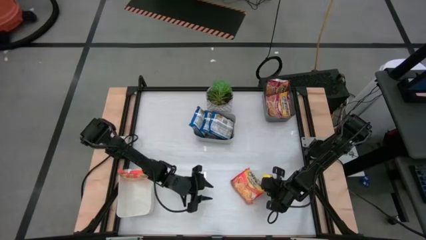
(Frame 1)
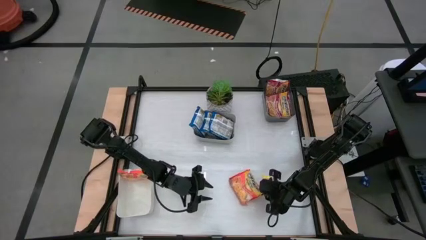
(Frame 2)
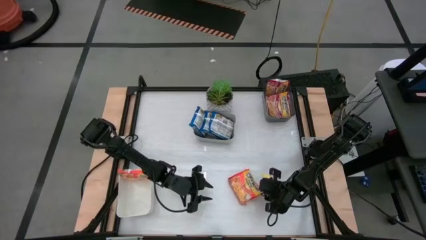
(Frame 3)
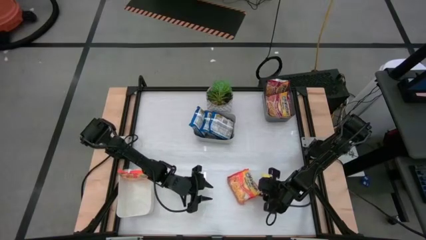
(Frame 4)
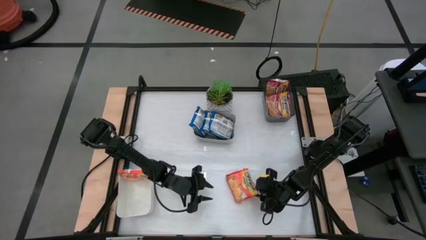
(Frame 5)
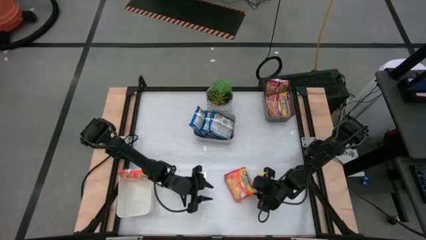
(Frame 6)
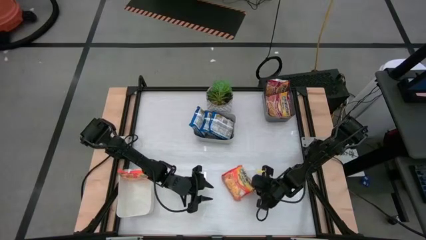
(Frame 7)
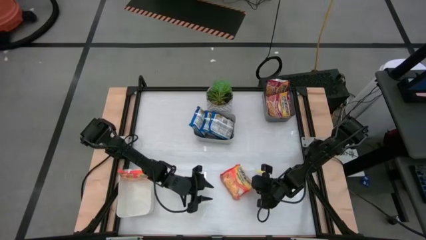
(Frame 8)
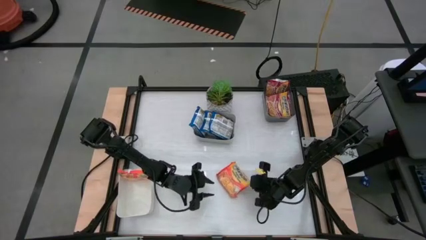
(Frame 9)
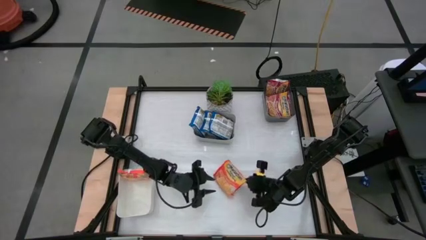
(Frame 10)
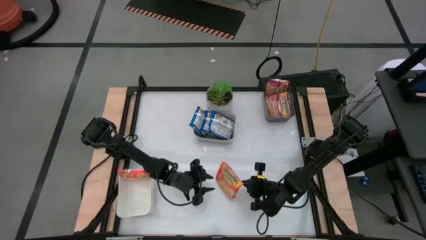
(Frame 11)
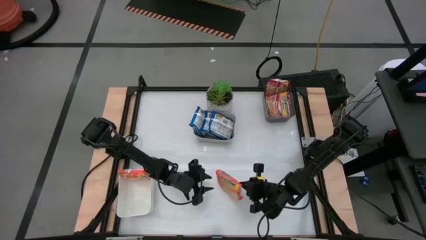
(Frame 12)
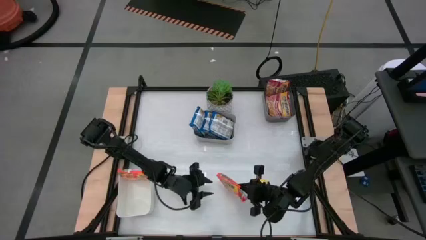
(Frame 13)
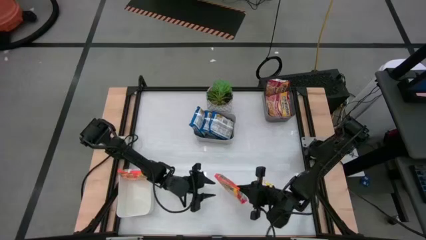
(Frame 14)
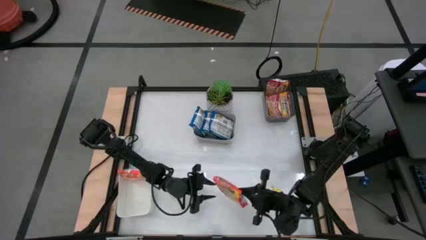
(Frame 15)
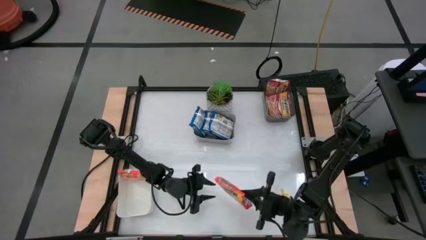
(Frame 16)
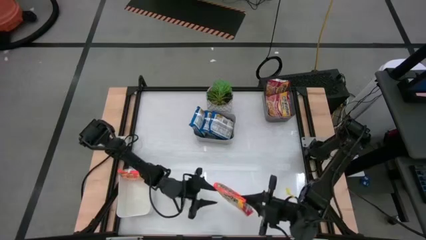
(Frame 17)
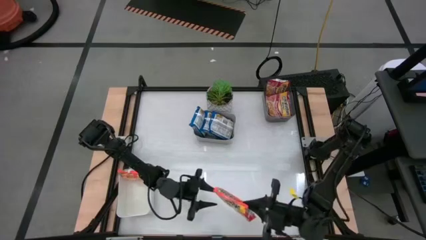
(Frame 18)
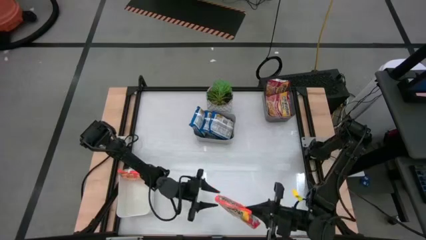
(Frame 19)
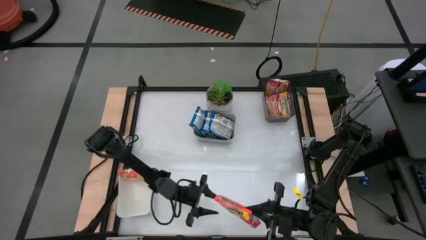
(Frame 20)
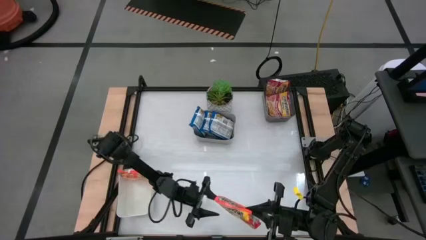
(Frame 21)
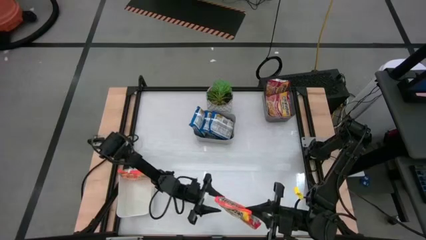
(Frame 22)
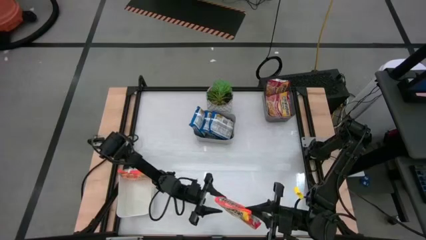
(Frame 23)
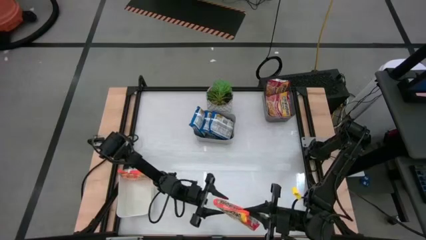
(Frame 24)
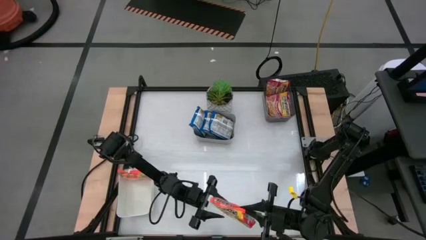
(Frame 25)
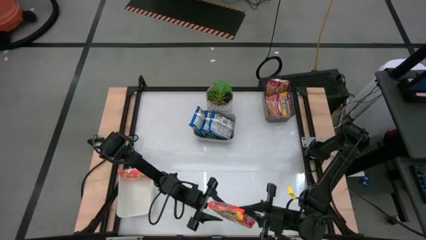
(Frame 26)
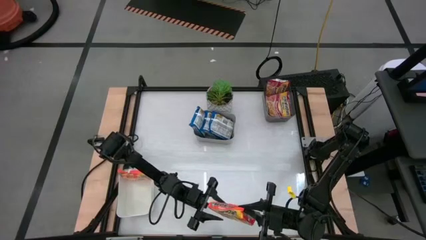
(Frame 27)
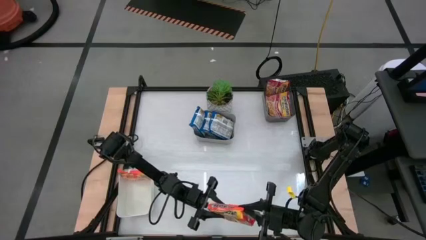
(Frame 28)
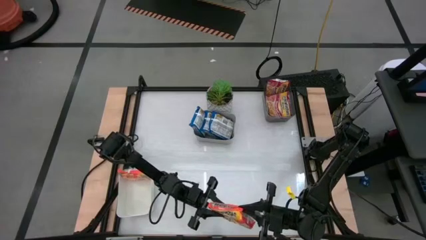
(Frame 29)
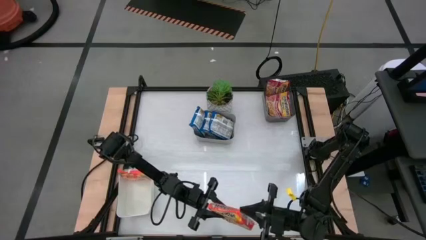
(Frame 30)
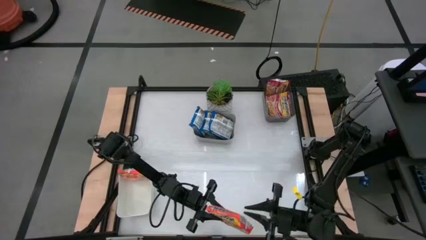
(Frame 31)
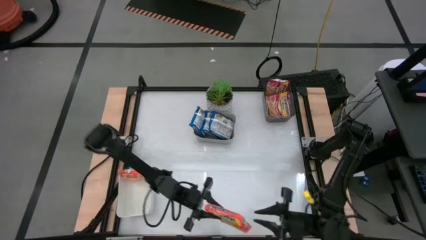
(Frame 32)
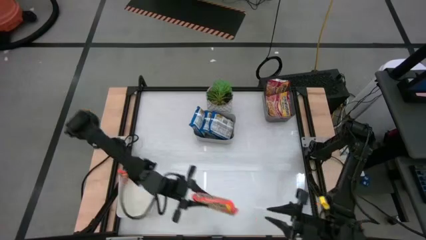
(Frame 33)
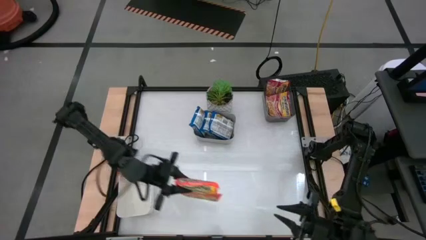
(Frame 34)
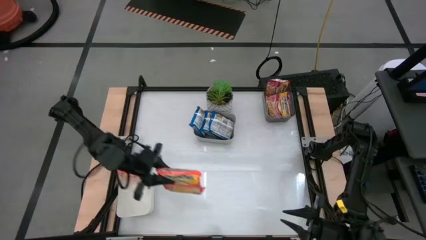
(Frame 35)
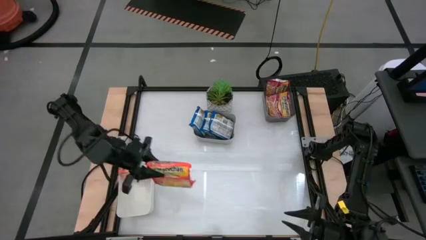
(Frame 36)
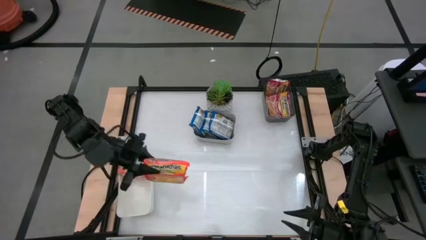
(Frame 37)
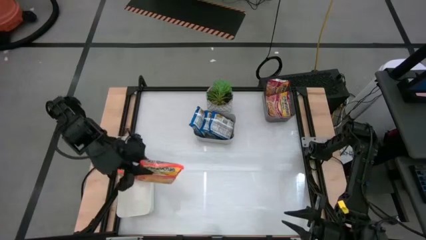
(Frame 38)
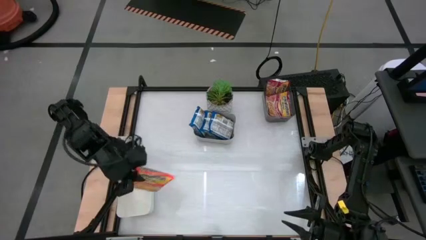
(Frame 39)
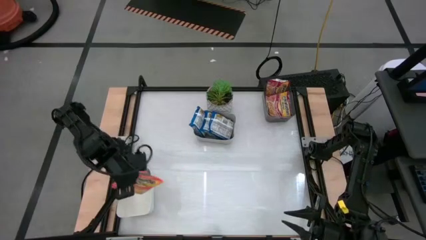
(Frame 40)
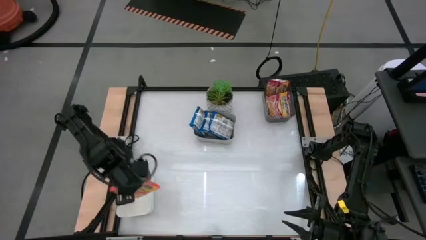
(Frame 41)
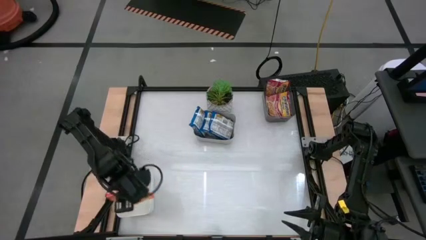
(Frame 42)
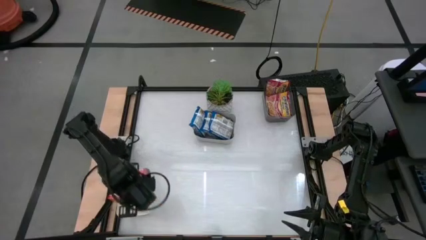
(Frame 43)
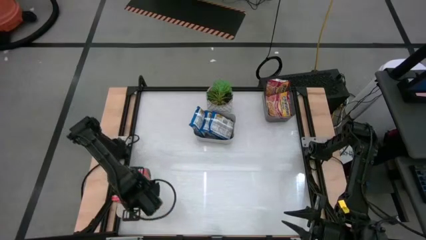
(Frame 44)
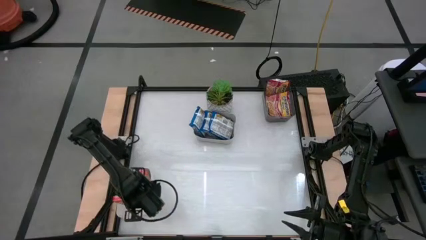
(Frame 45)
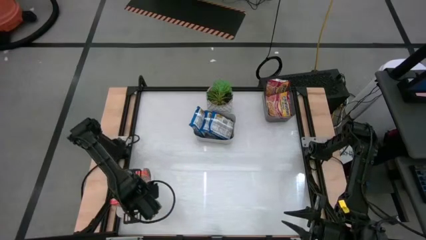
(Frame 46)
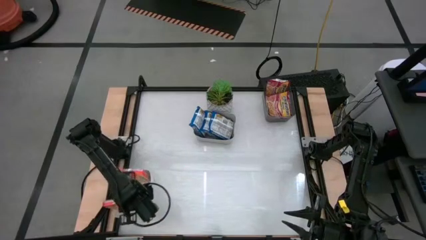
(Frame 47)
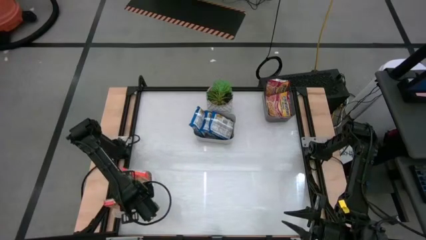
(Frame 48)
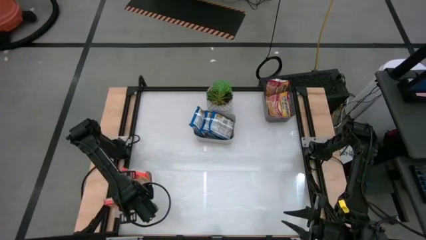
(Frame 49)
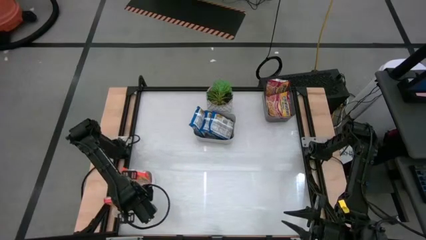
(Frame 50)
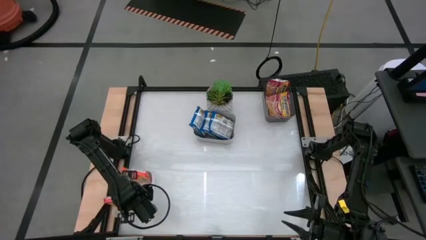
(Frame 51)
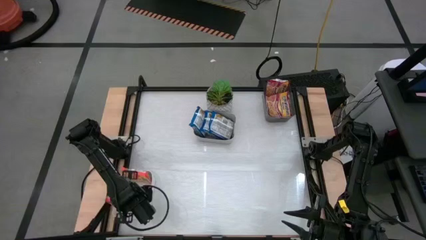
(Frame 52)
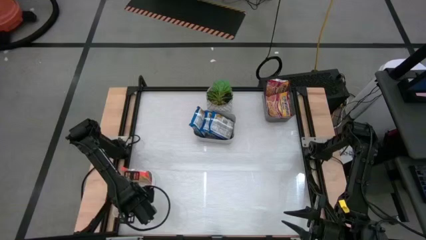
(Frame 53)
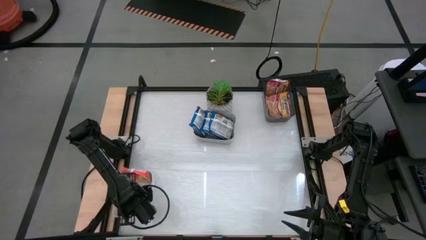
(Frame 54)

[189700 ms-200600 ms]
Task: Sort Maruchan noodles
Put the orange noodle pack into the white bin

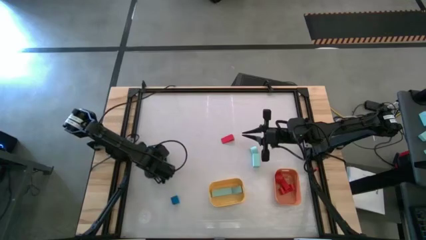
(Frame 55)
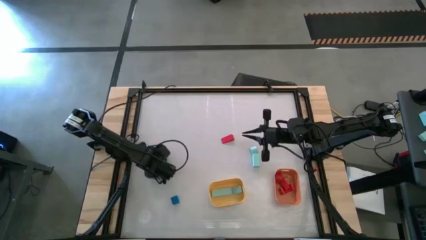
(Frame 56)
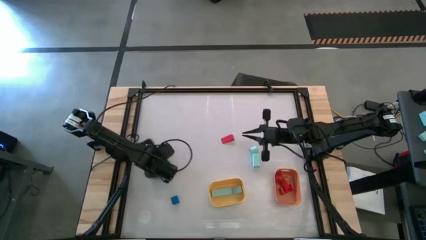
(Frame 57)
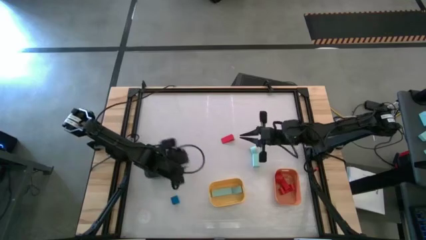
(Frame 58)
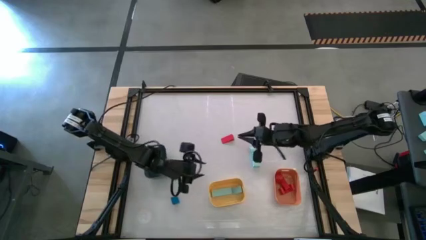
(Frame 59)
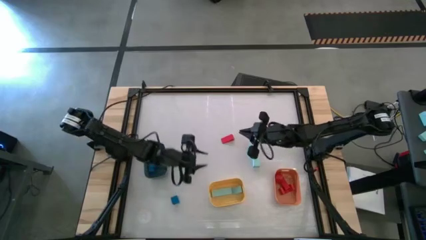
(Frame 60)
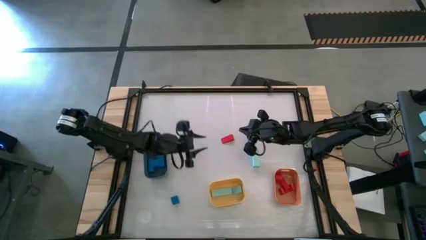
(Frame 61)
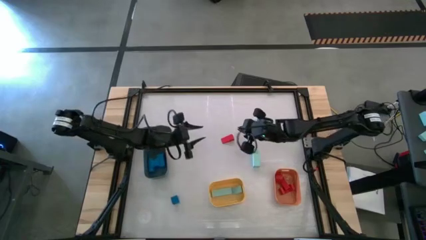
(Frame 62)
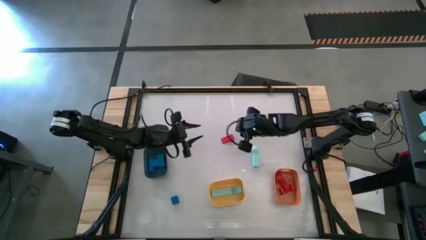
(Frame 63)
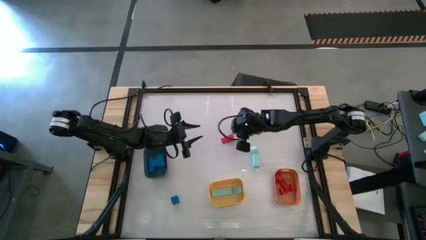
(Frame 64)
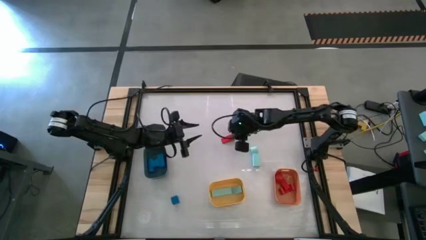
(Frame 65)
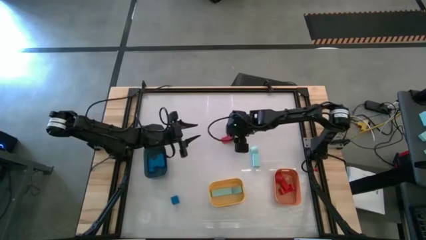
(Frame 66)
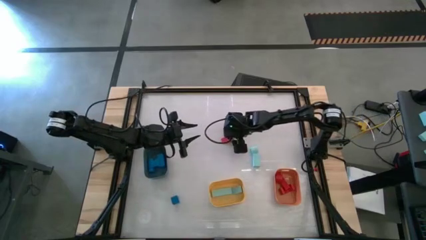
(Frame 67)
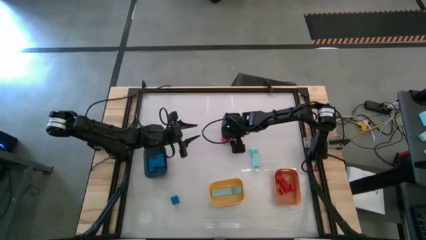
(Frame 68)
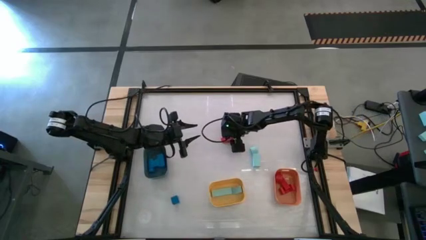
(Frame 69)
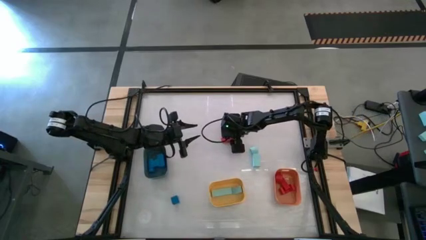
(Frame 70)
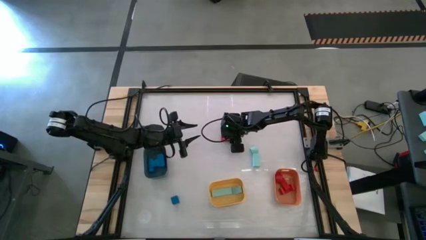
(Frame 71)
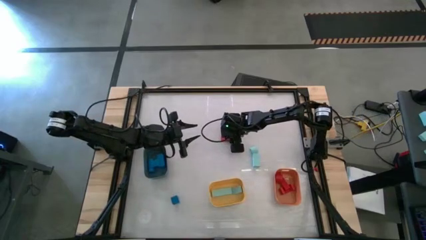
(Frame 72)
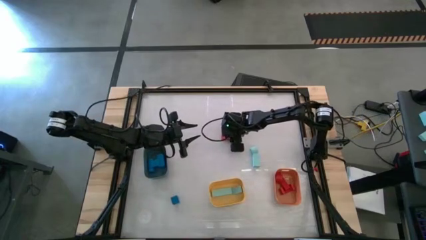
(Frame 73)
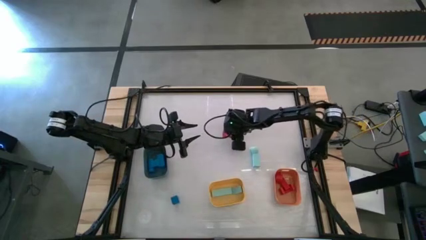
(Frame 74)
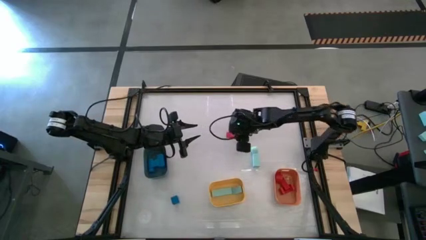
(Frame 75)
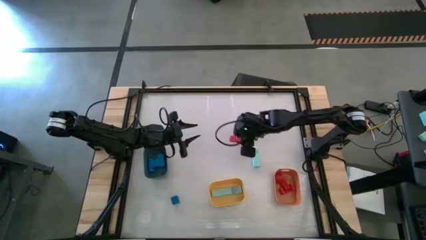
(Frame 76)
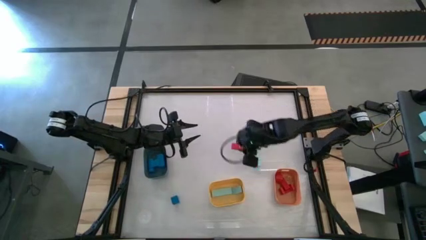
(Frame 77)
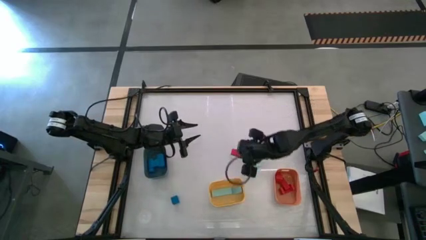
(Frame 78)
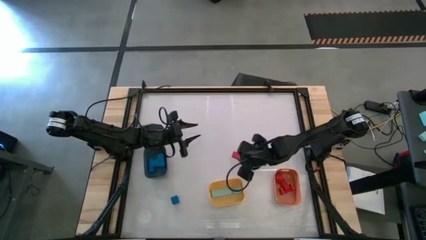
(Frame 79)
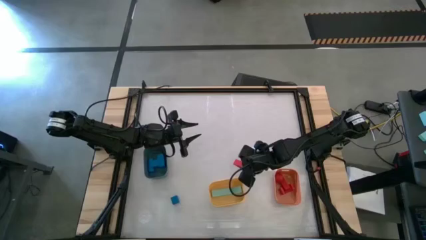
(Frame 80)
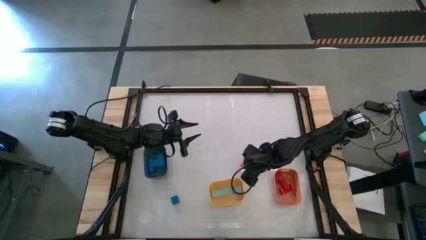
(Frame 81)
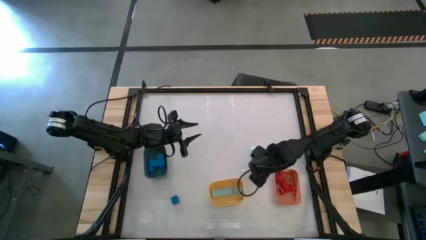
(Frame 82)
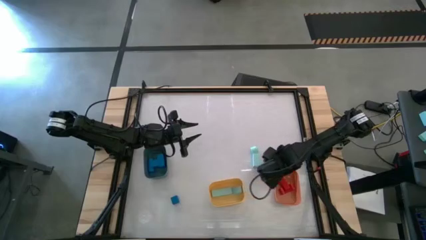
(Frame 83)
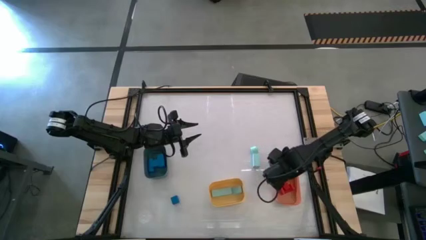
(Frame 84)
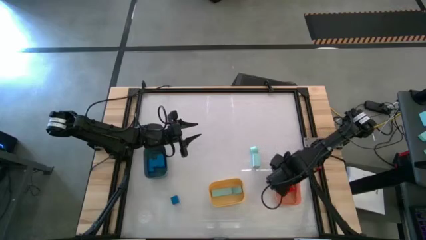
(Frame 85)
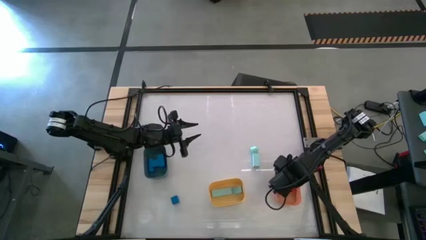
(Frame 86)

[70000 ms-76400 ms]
Task: Sort & place blocks by color
Put the red block into the orange bin
